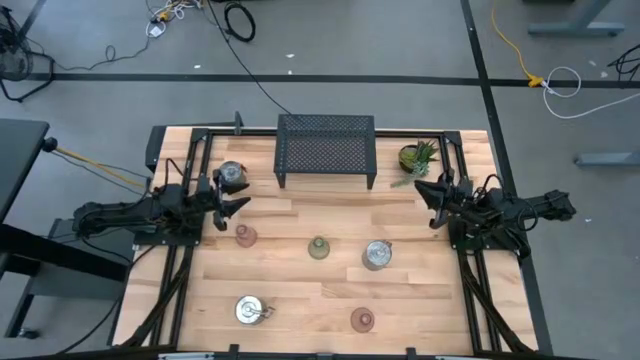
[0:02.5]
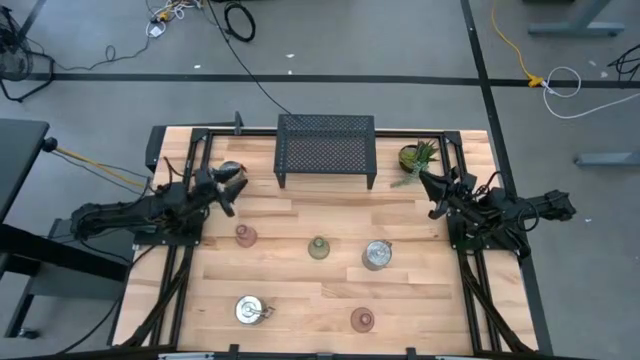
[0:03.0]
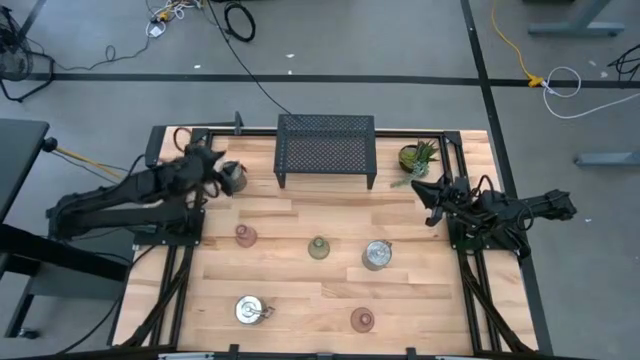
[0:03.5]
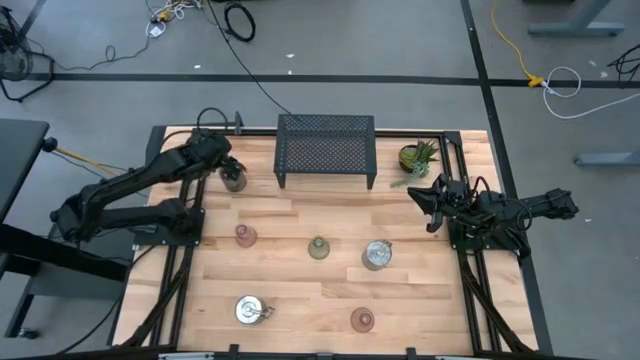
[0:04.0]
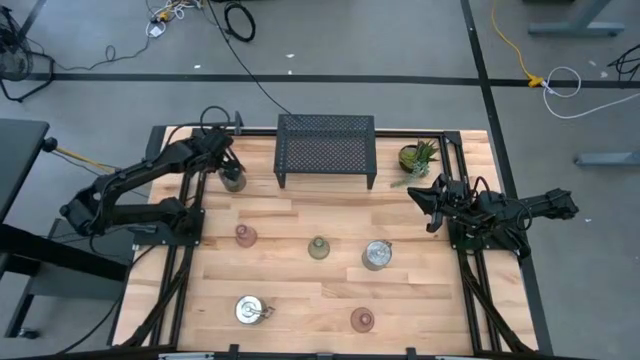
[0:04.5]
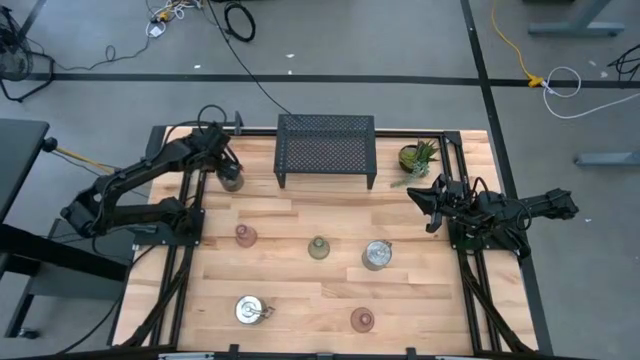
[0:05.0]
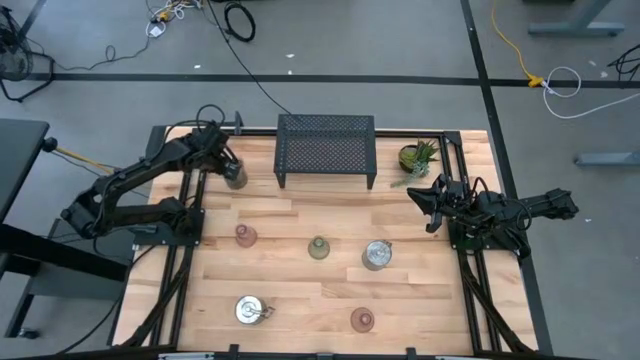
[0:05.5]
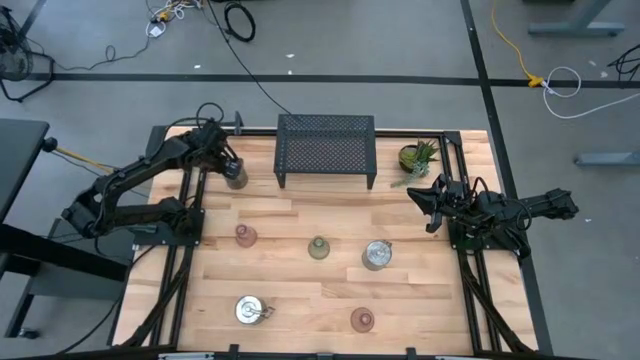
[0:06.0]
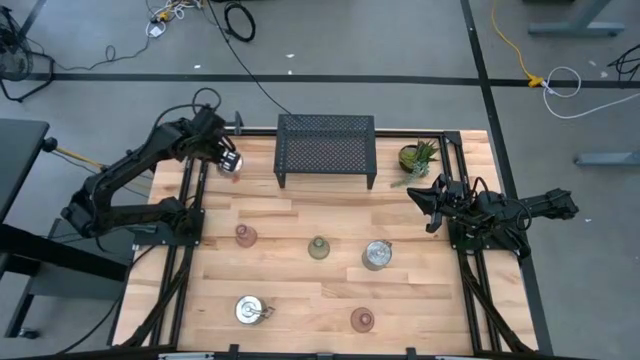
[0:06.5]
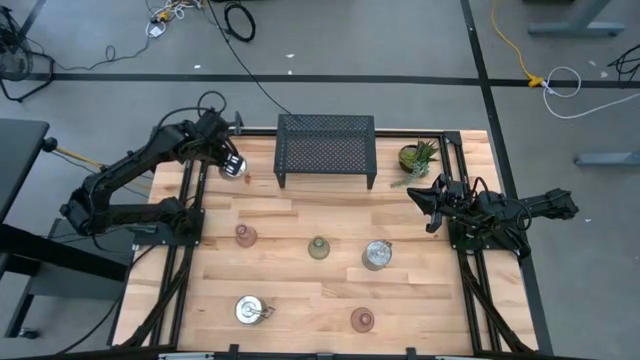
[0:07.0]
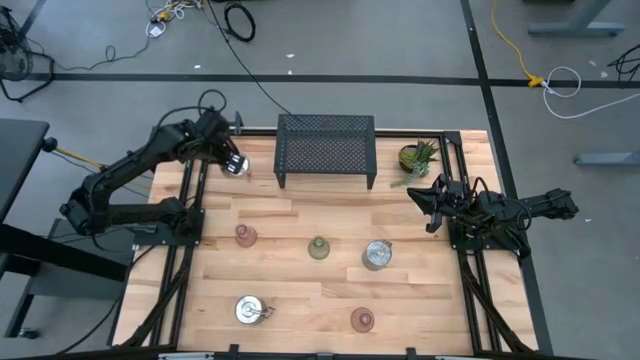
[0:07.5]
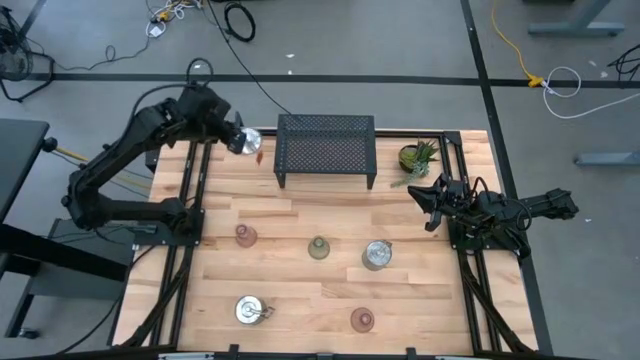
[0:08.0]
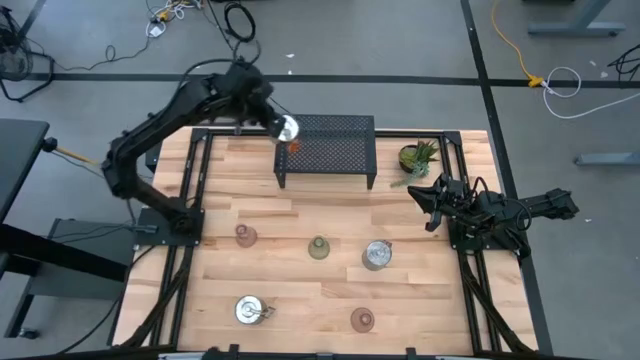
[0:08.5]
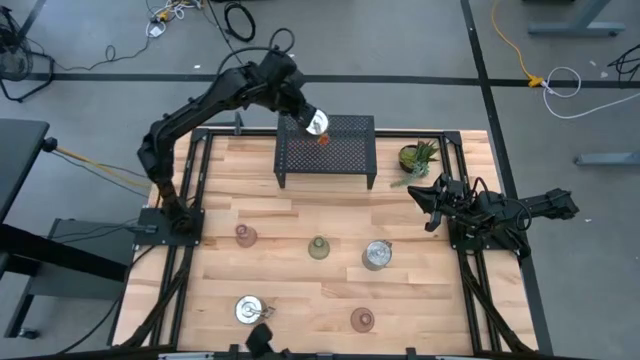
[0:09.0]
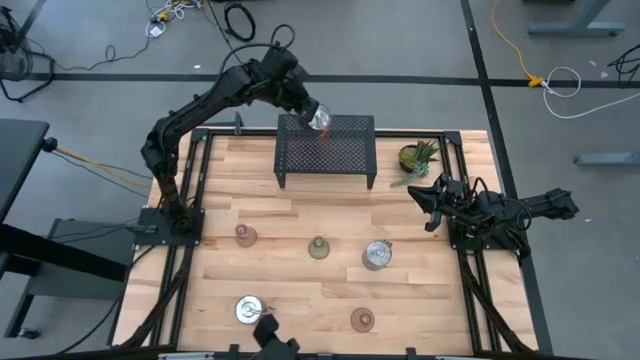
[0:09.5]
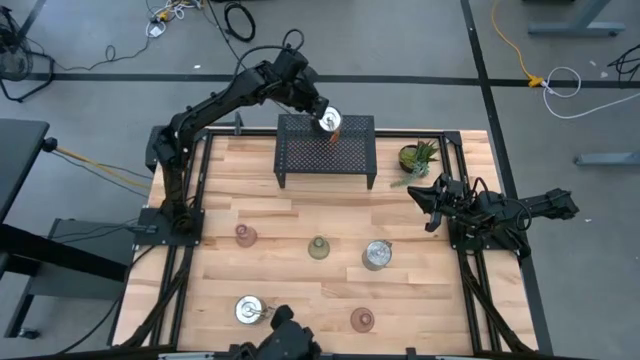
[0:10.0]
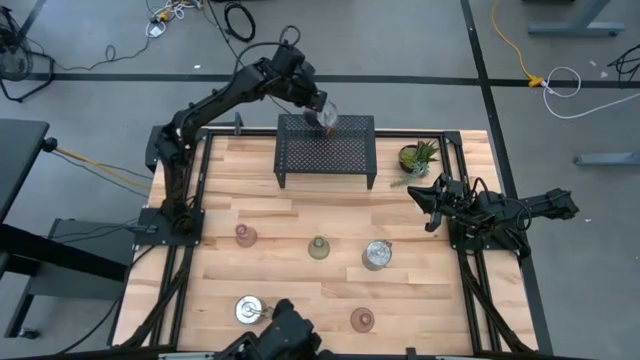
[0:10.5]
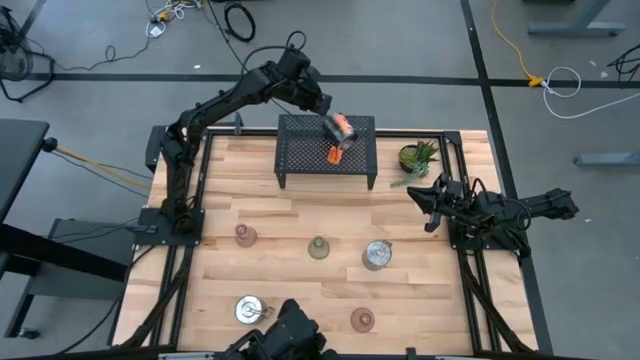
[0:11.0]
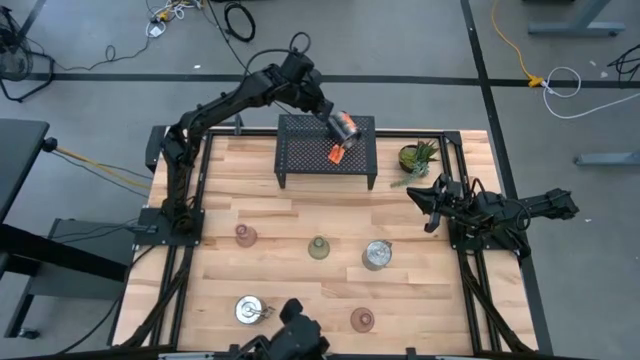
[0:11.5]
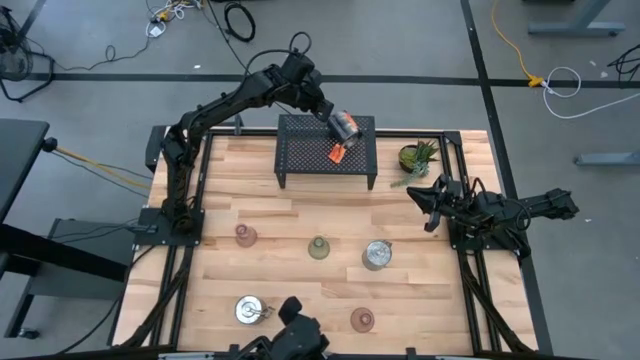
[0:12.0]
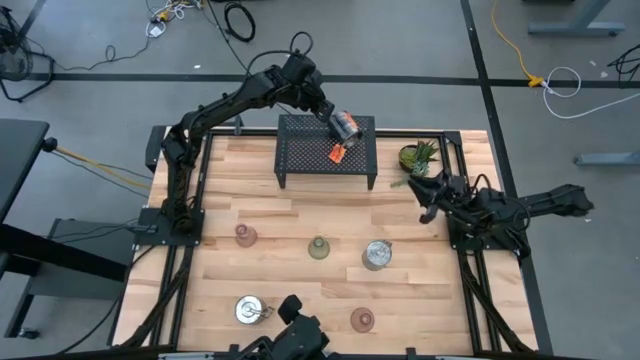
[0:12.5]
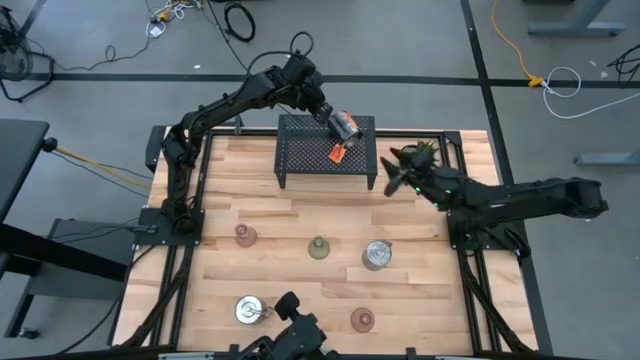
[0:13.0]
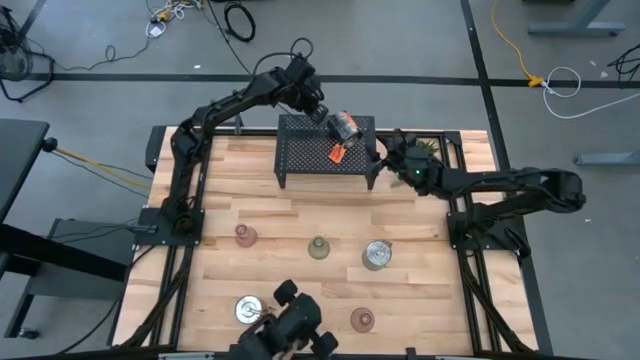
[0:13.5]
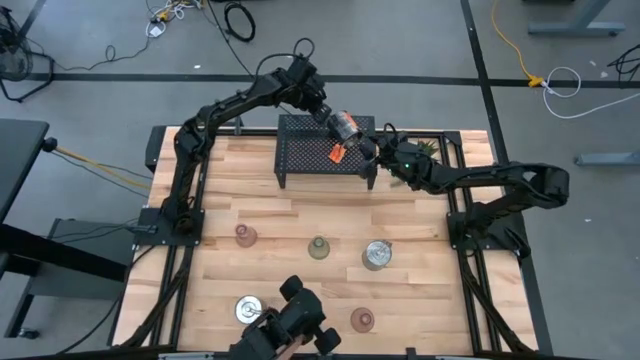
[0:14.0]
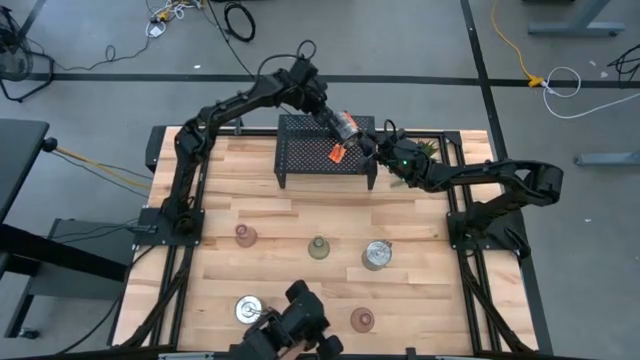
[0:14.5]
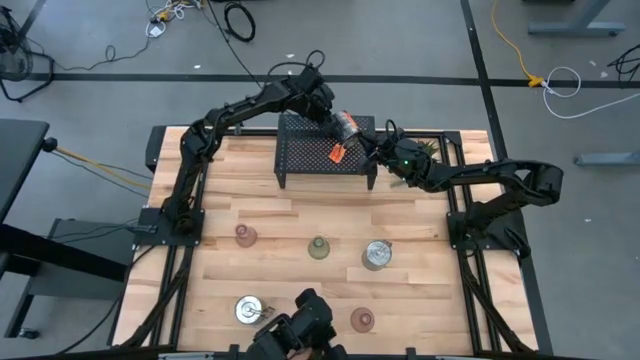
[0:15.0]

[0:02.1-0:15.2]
Task: Pick & Place candle stick holders
Put the top scented candle on the shelf

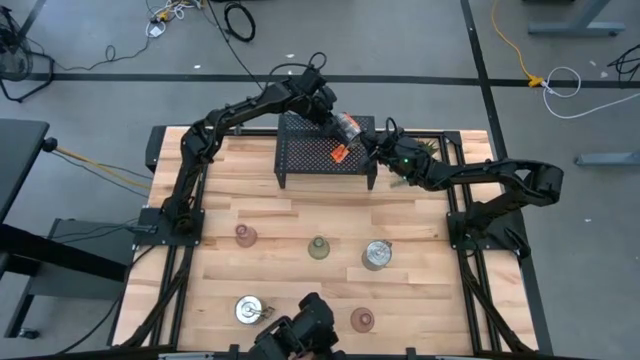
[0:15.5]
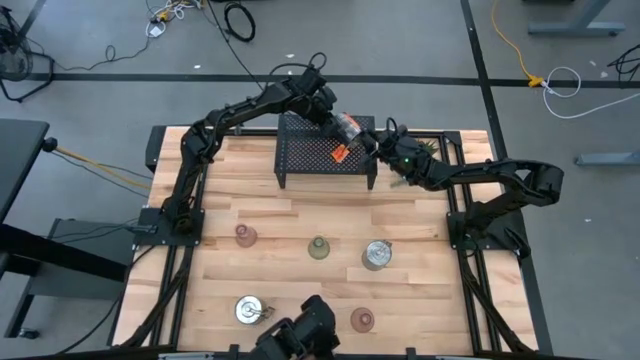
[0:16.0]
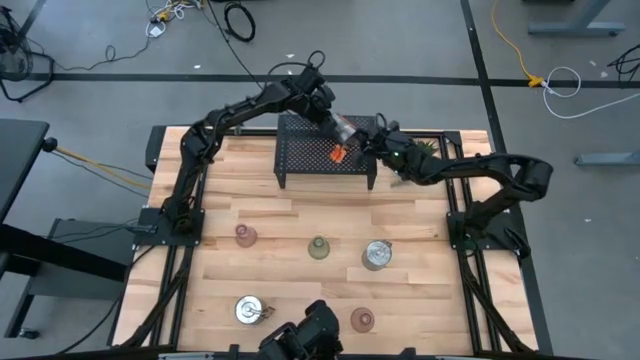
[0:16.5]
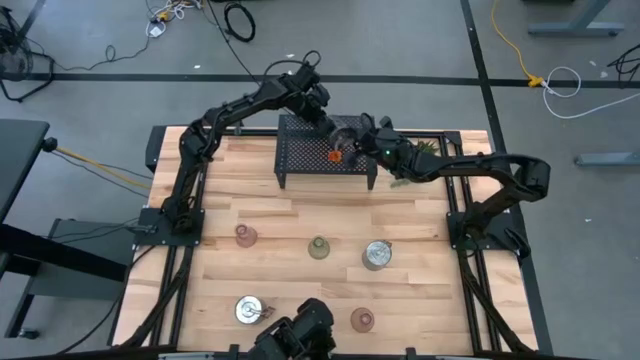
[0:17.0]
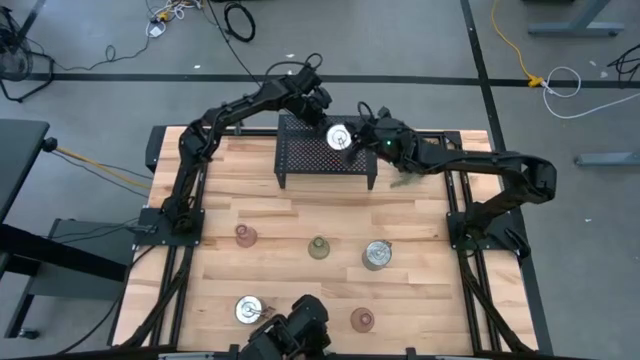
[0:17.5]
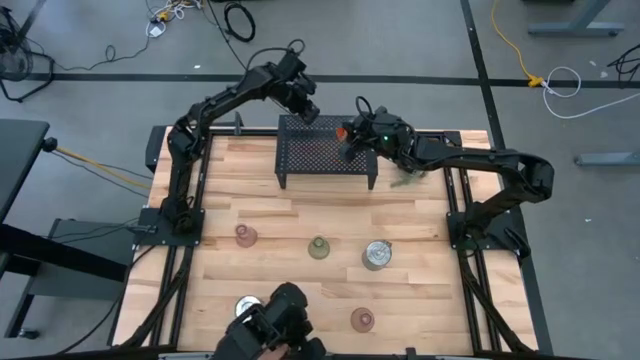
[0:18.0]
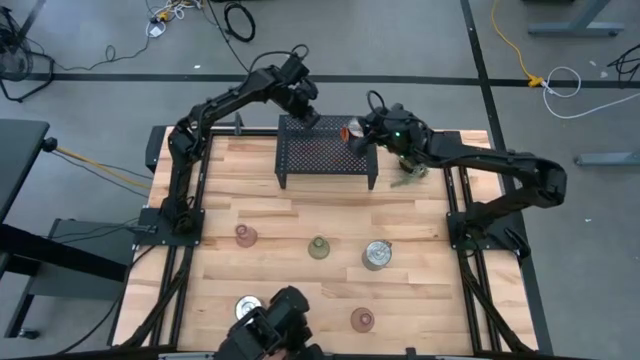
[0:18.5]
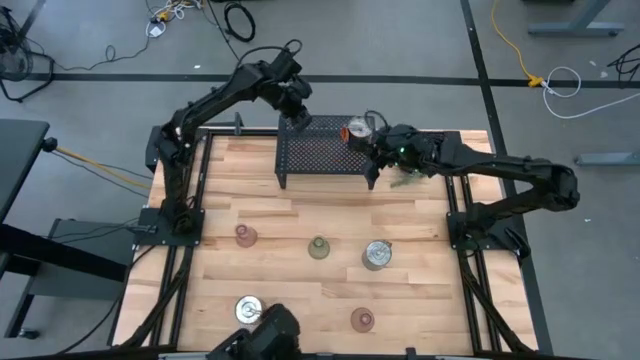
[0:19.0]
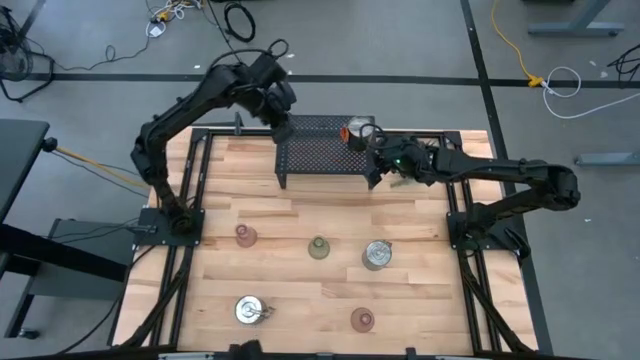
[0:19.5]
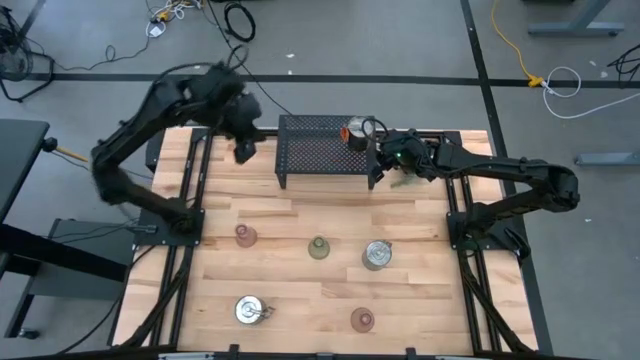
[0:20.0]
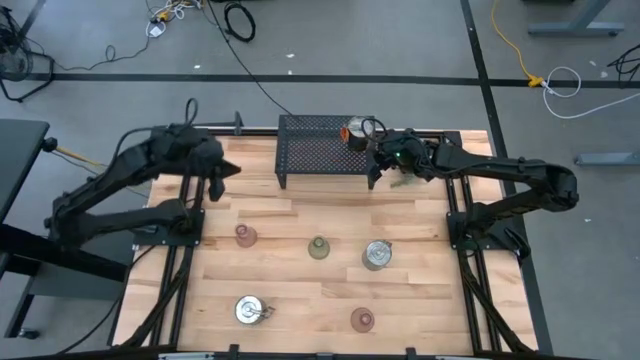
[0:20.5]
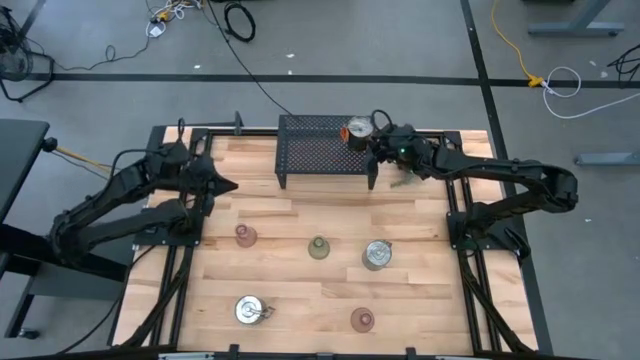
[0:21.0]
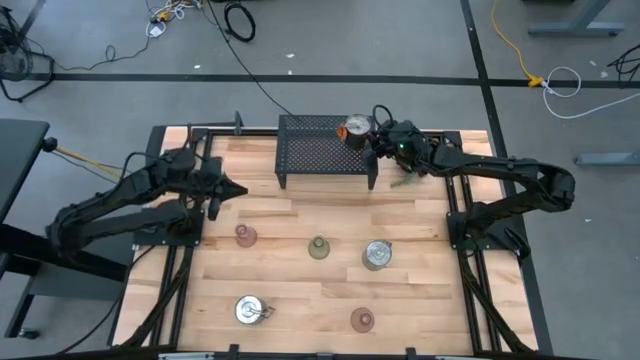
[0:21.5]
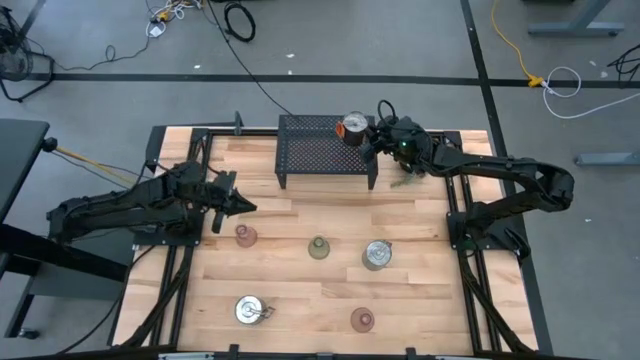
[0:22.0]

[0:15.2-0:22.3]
Put the top scented candle on the shelf

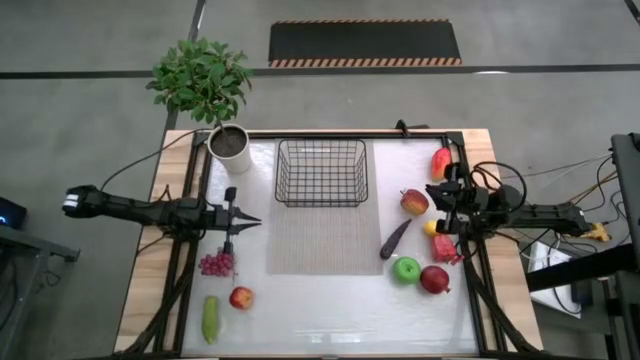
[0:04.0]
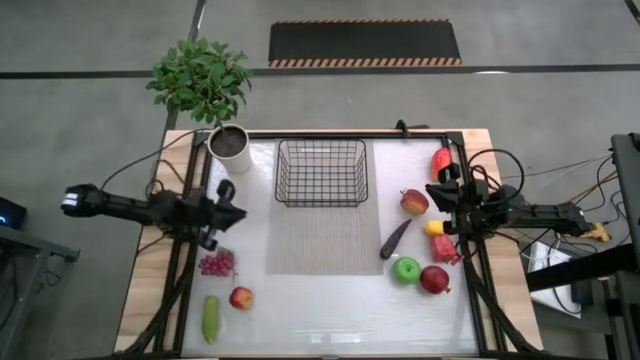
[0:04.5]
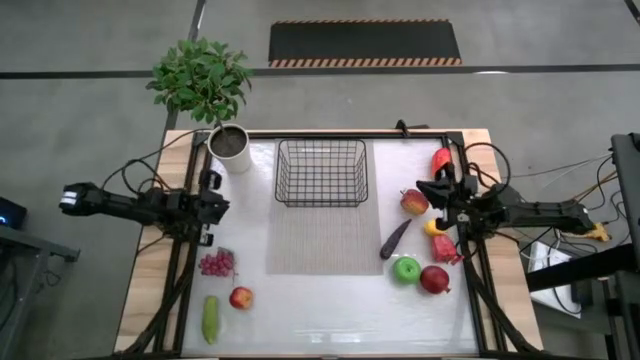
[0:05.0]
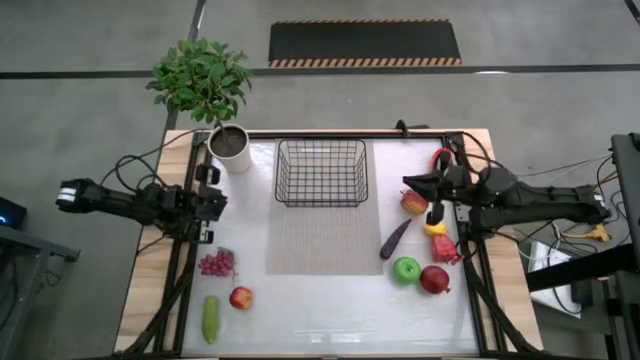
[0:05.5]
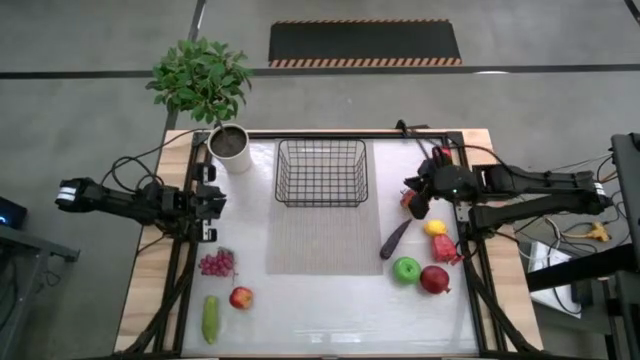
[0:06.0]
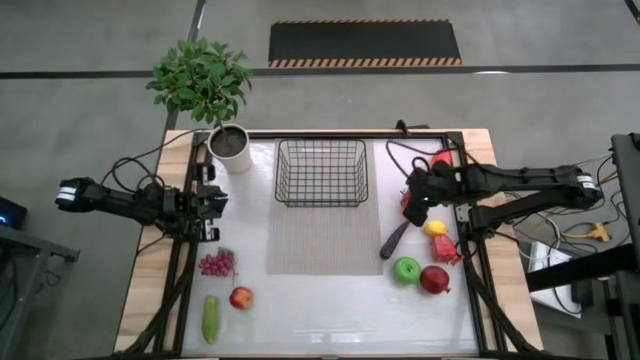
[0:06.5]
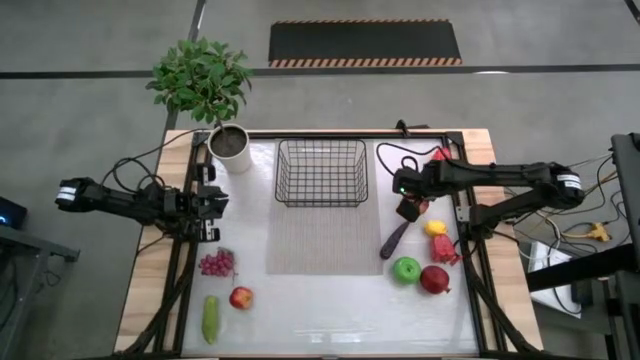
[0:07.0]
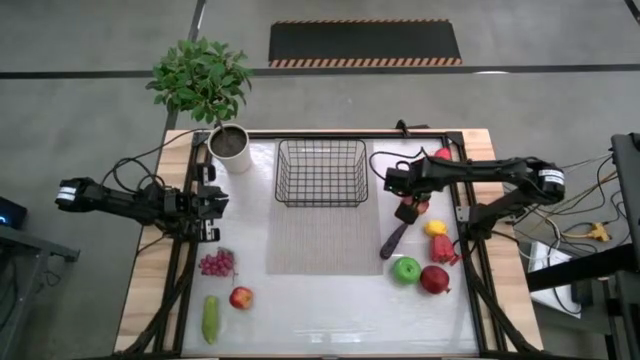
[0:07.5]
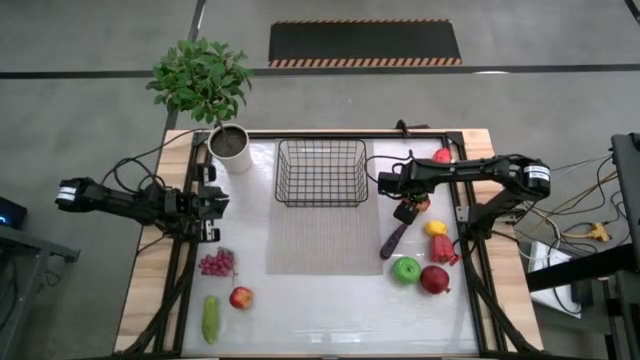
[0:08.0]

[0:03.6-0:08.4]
Task: Build produce basket
Put the top red apple into the wire basket
